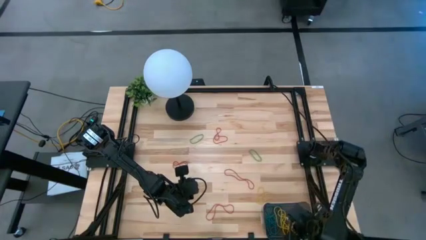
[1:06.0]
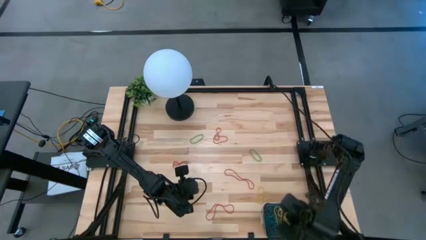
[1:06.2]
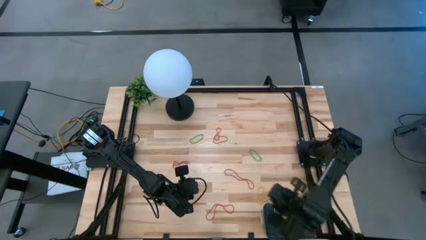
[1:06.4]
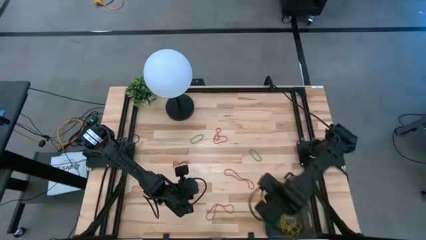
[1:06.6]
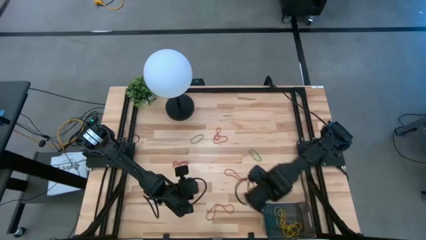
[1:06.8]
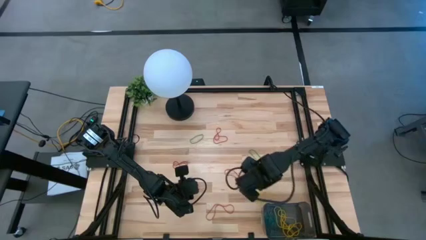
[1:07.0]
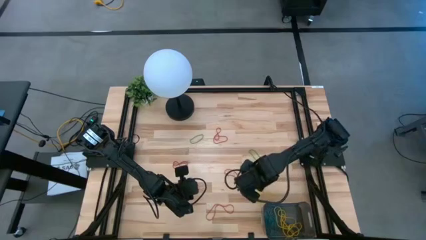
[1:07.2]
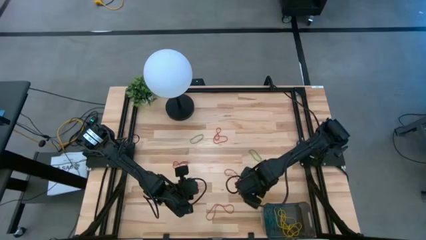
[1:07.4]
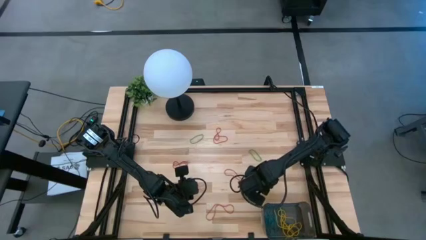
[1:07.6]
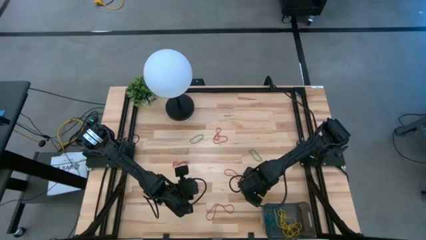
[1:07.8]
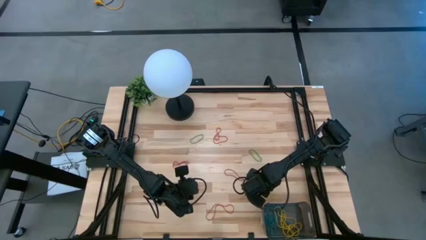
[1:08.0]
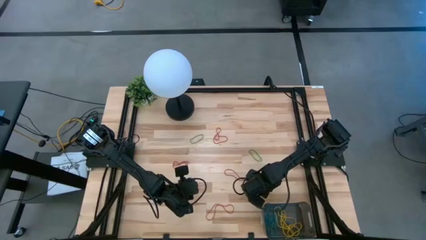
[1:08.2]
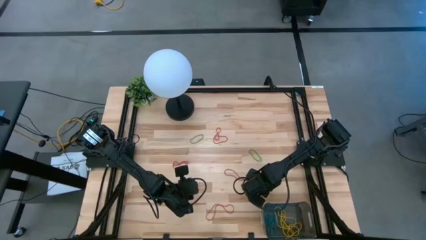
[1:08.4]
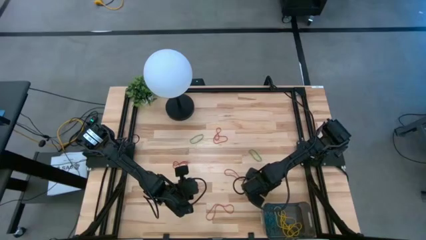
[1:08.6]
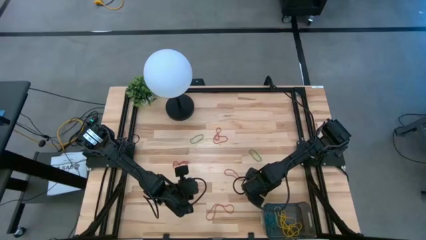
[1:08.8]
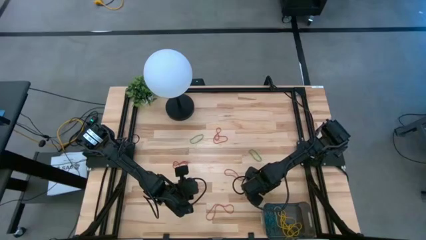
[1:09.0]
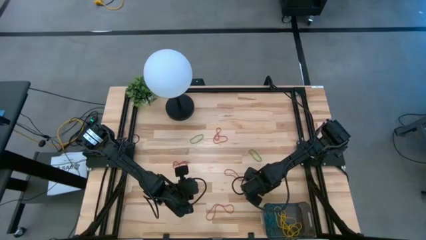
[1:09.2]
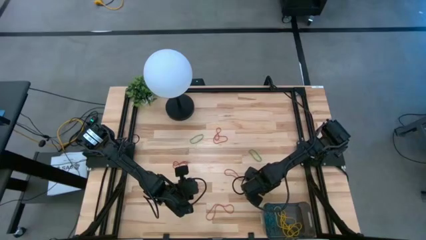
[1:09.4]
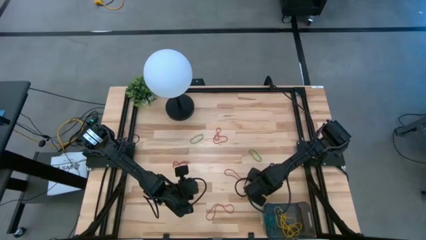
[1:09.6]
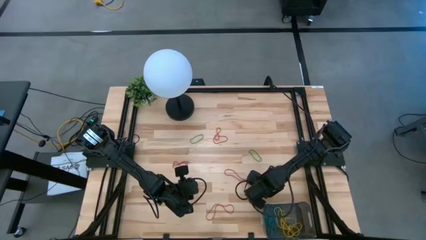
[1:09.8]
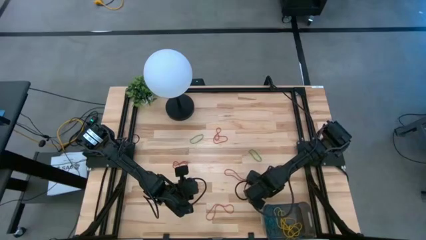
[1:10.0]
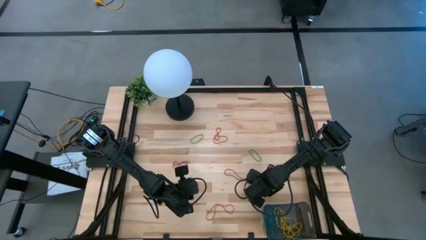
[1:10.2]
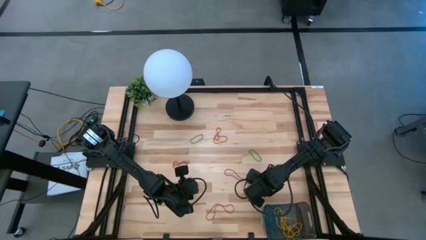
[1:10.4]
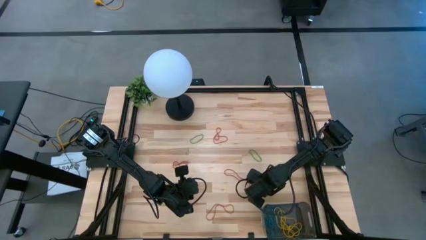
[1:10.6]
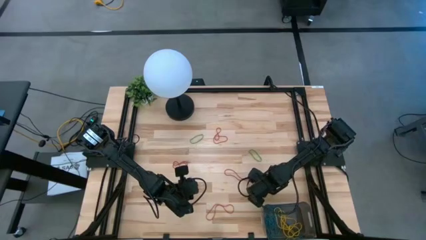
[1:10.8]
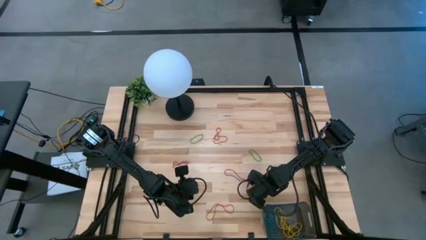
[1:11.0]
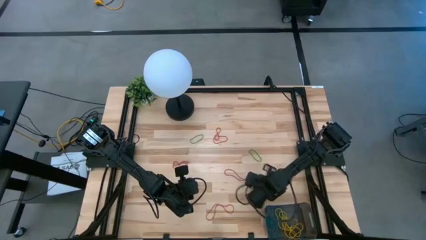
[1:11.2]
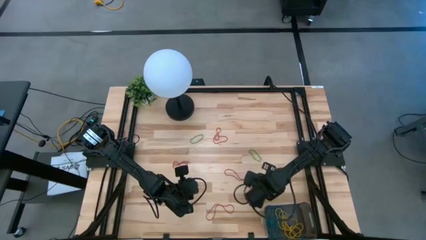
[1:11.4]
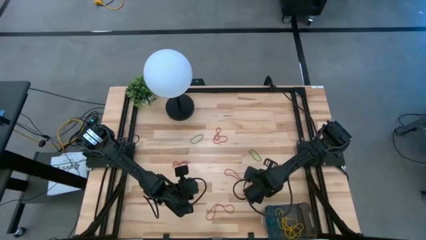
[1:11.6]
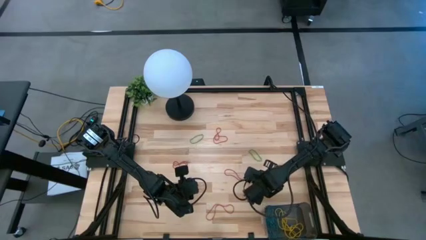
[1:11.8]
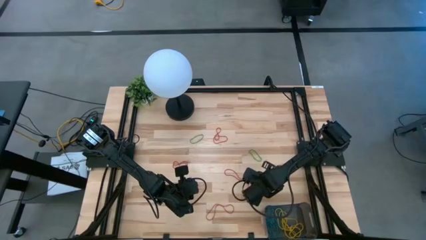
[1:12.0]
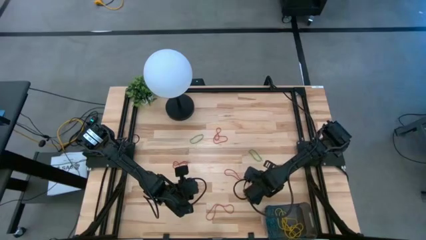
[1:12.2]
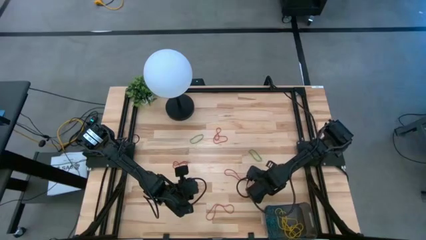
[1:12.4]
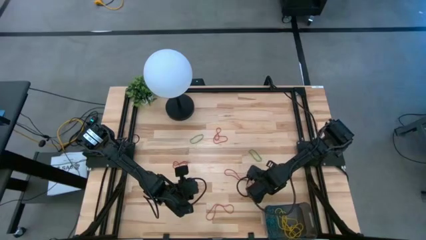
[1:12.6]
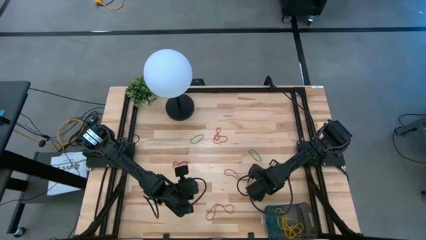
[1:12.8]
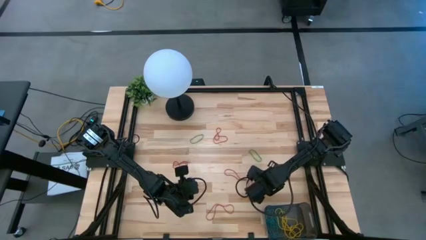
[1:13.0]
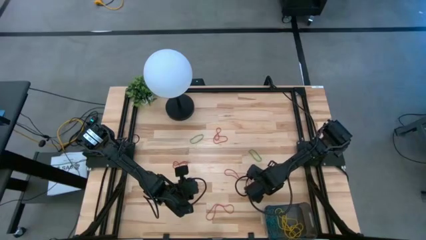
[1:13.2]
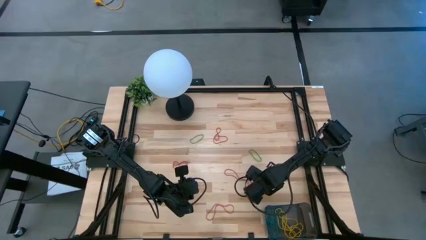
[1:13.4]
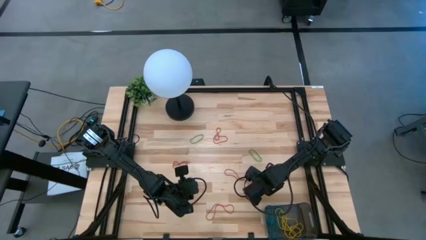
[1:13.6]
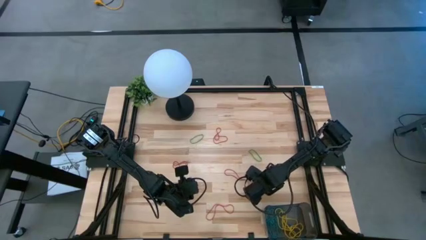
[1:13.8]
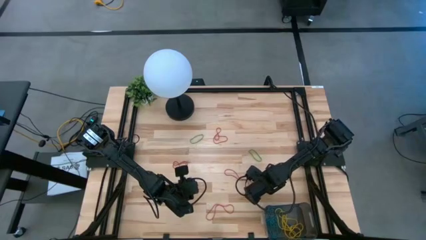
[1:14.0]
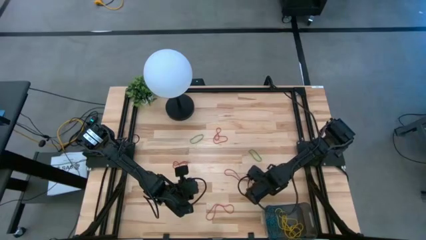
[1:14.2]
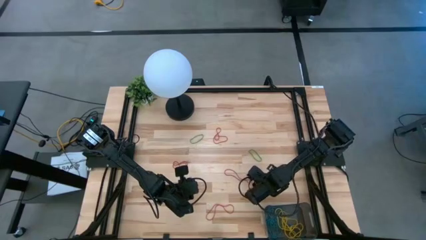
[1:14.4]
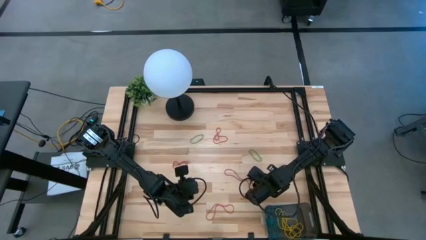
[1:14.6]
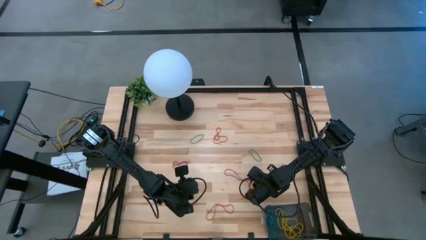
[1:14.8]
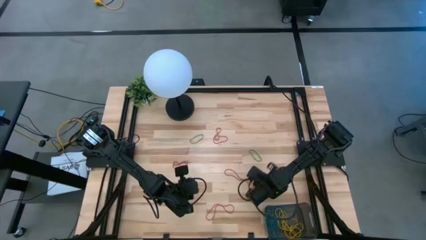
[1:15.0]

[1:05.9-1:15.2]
Task: Pick and place items into bin
Put the yellow rubber band into the black bin

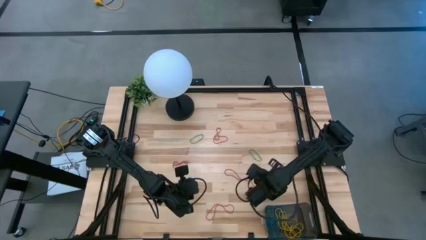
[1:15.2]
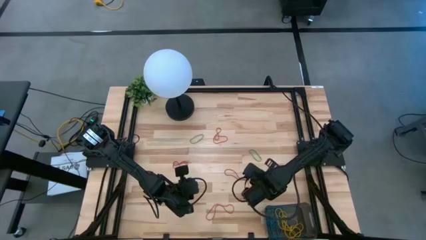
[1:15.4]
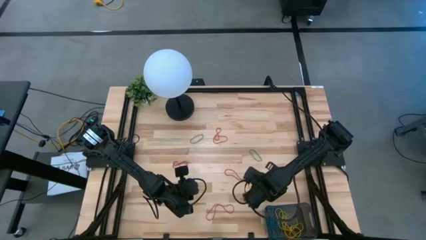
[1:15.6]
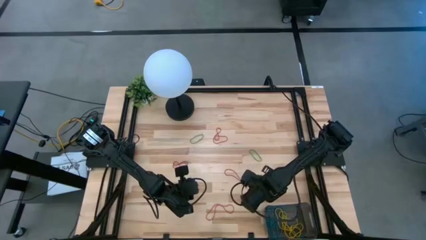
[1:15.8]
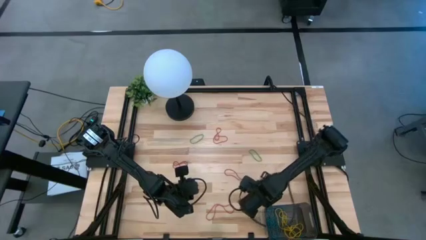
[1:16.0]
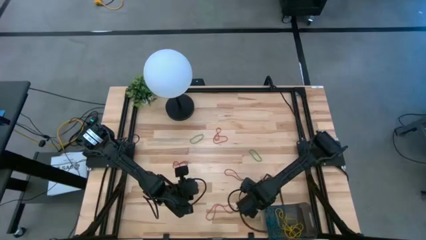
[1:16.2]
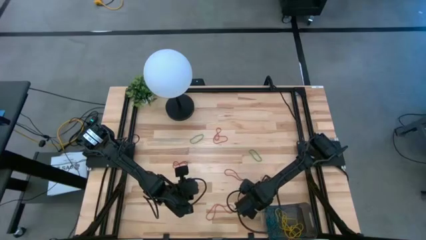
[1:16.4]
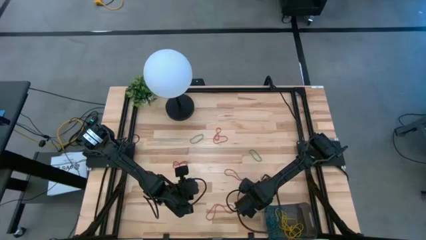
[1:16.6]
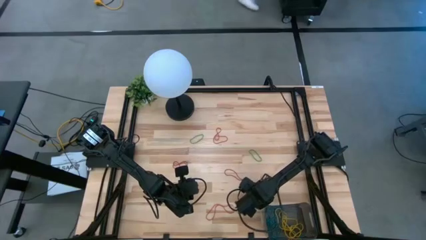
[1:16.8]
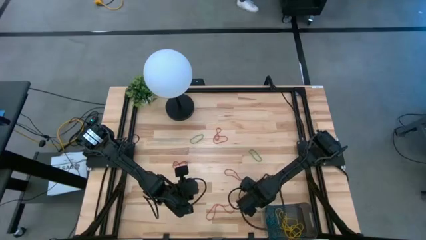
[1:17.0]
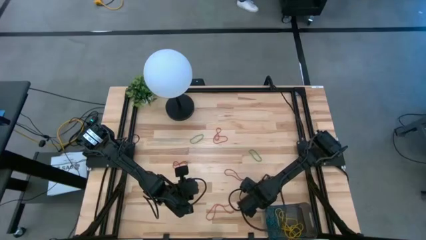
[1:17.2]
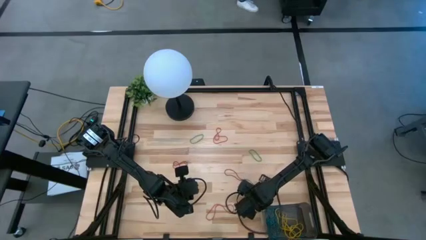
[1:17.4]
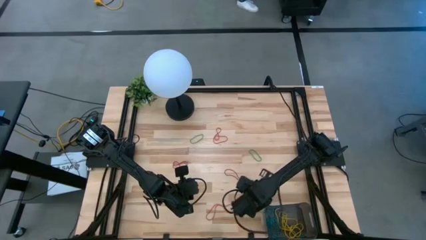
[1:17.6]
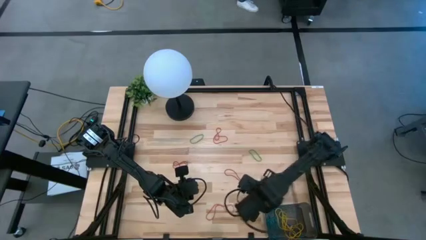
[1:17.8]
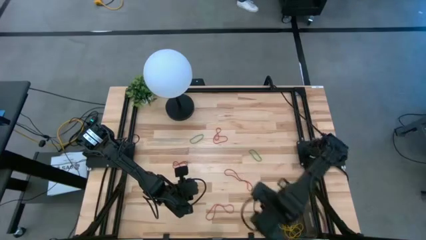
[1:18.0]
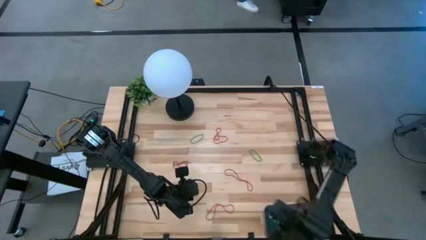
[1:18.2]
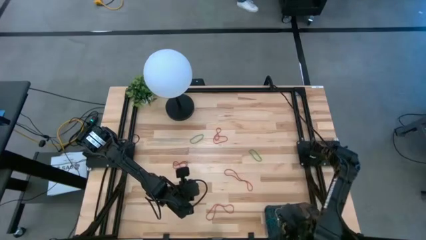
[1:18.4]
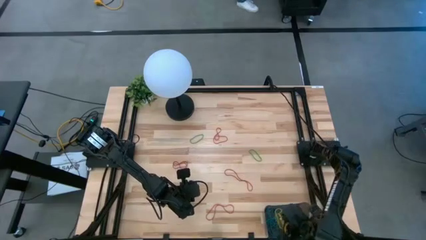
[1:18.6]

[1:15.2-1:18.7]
Put the yellow rubber band into the black bin

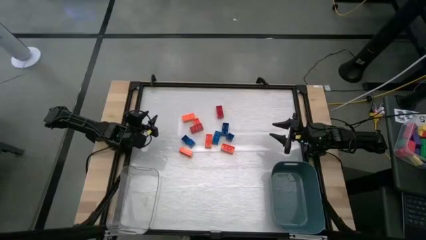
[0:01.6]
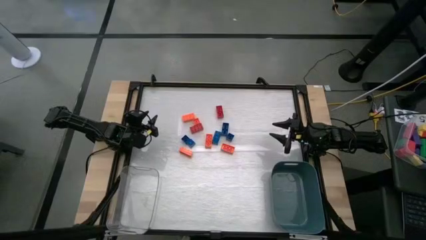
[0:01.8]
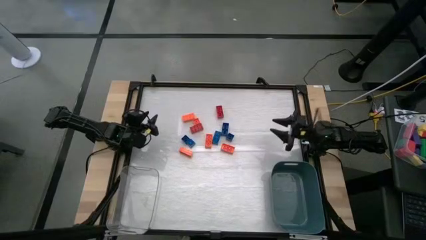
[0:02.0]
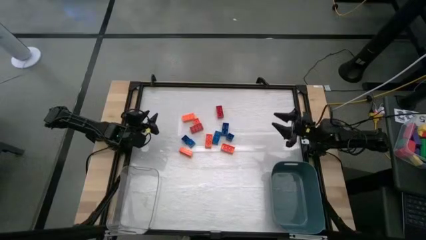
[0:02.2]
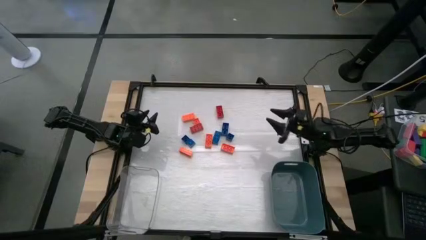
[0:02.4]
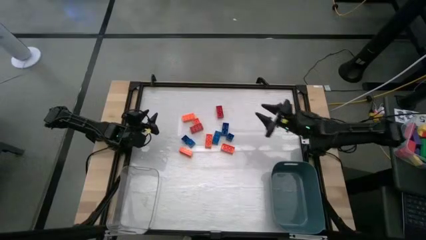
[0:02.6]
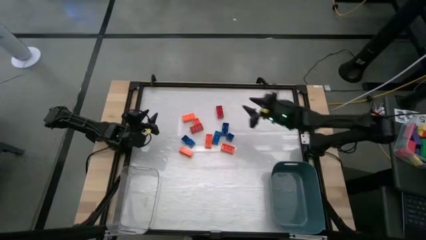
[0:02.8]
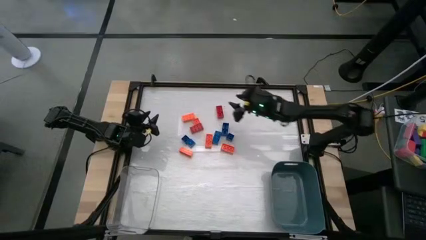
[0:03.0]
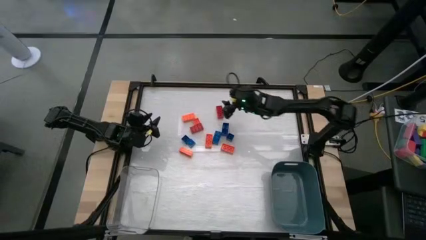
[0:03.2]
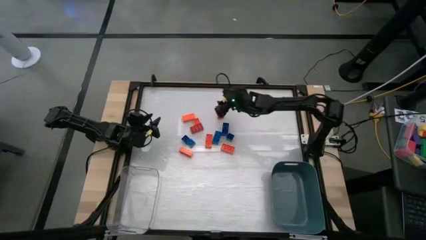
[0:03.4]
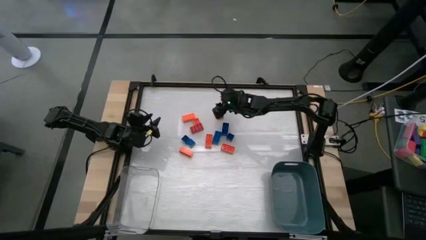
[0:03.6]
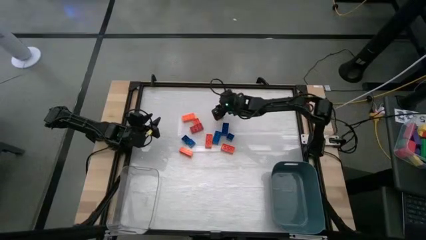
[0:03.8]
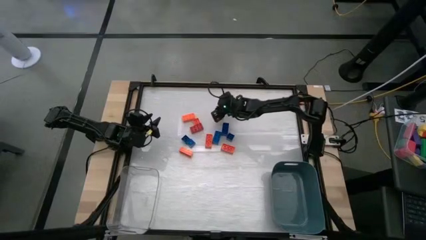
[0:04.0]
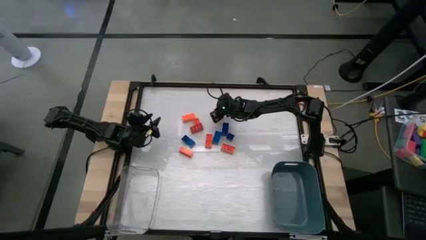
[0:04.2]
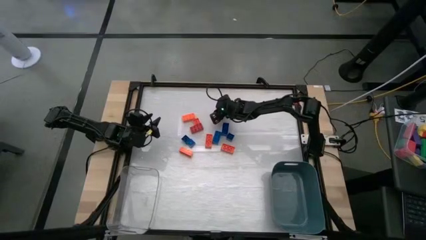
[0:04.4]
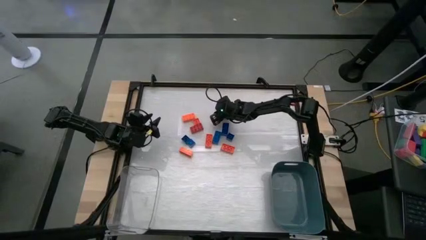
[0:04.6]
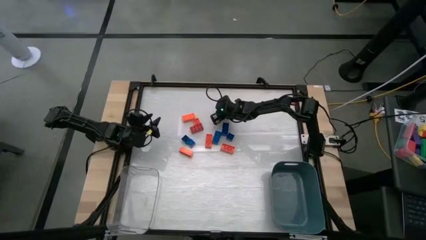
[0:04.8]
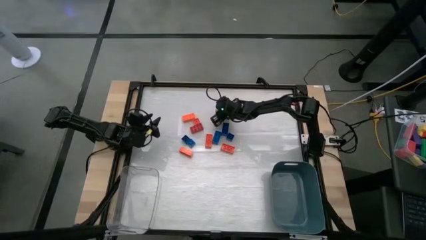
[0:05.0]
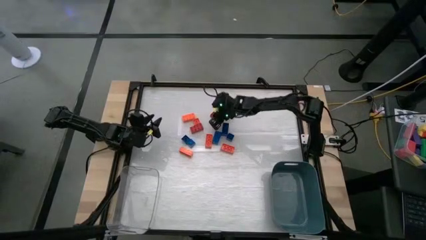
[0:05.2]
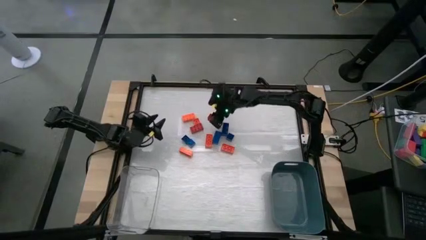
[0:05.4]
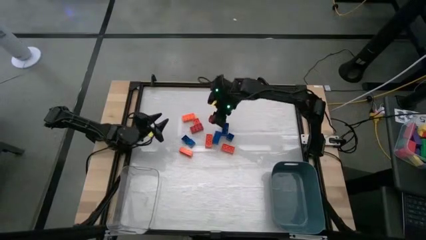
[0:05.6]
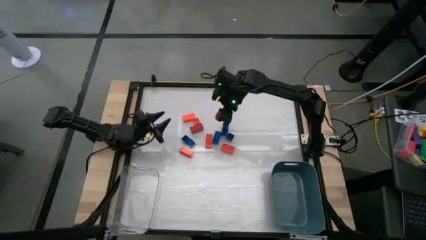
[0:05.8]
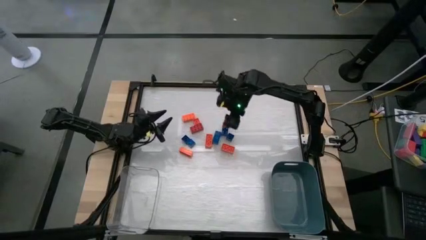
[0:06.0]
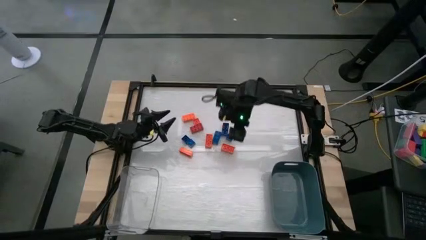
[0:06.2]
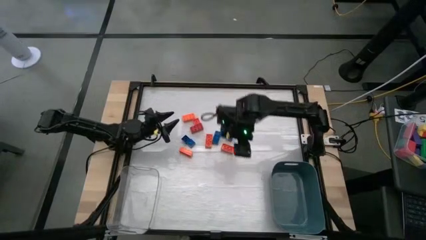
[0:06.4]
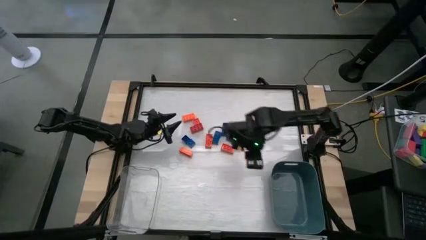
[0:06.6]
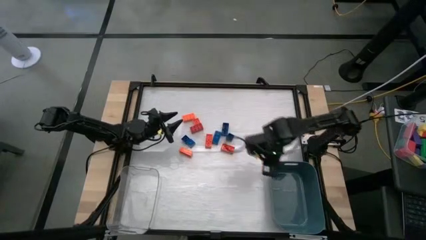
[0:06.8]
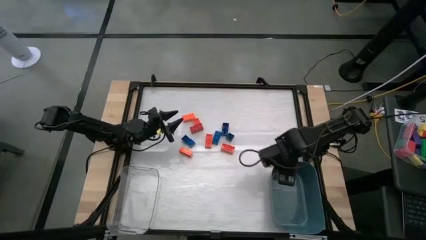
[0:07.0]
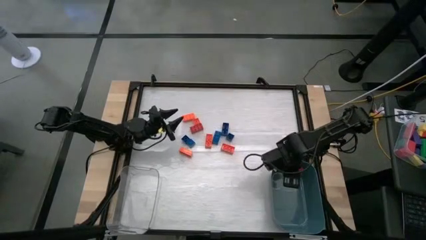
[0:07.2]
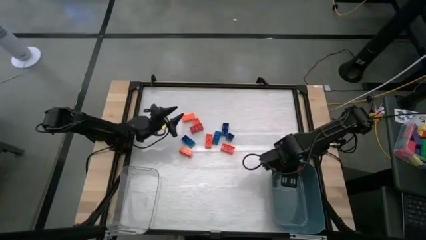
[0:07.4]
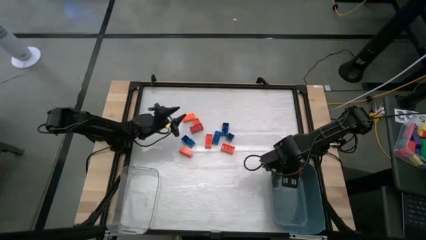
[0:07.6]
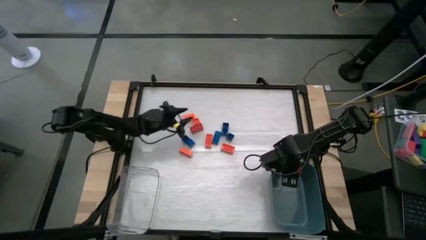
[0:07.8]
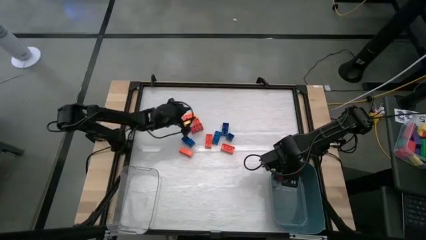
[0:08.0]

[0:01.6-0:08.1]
Task: Sort blocks by size
Put the large red game piece into the blue bin
